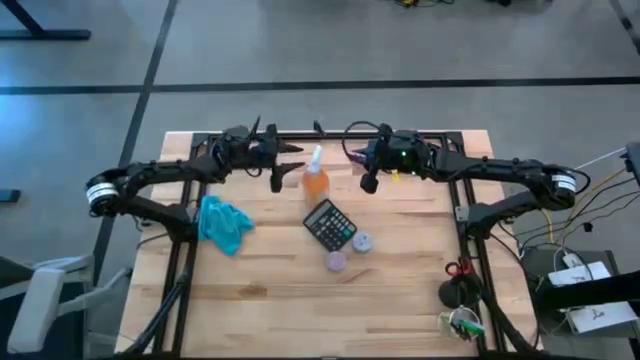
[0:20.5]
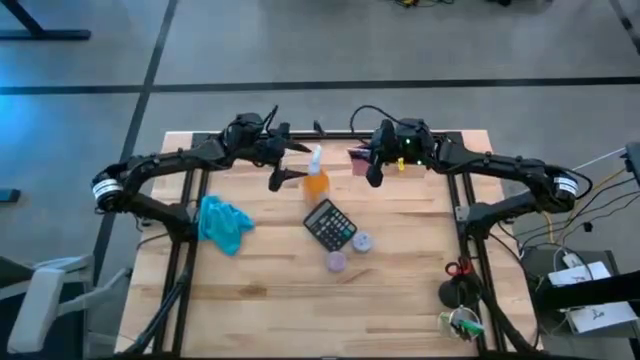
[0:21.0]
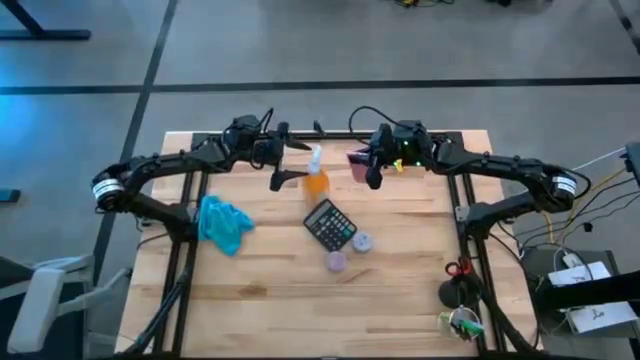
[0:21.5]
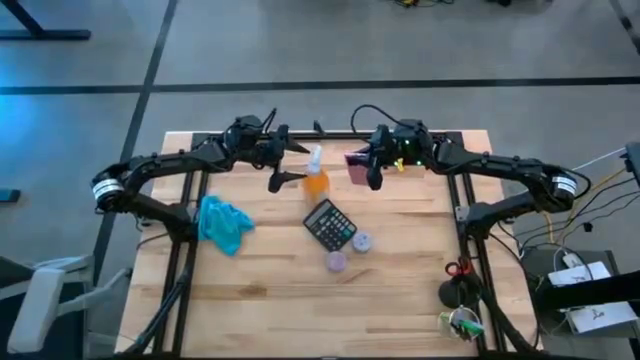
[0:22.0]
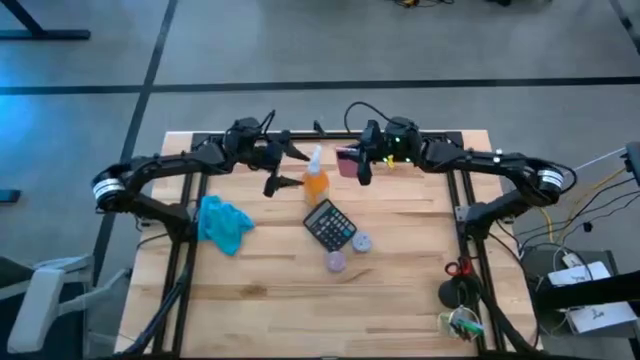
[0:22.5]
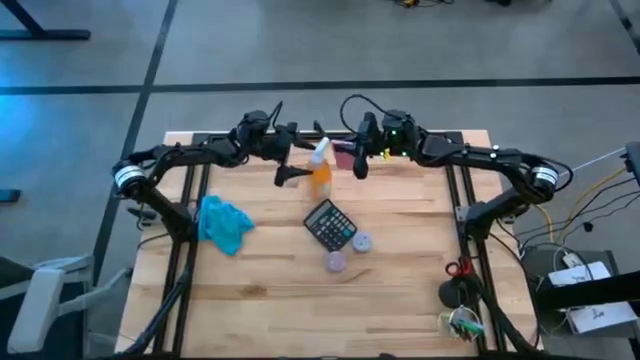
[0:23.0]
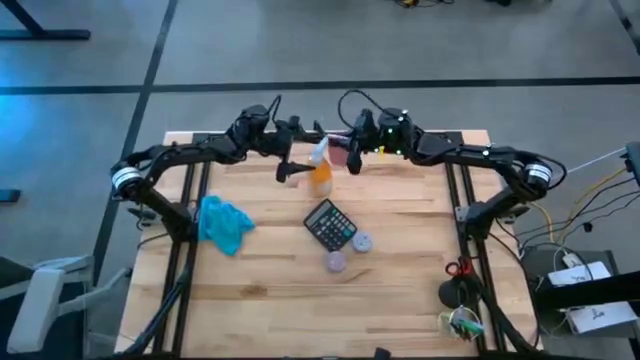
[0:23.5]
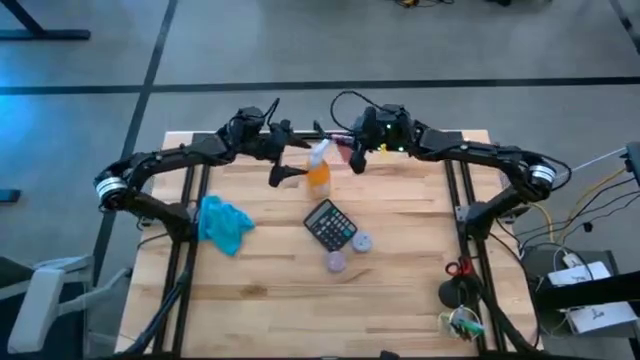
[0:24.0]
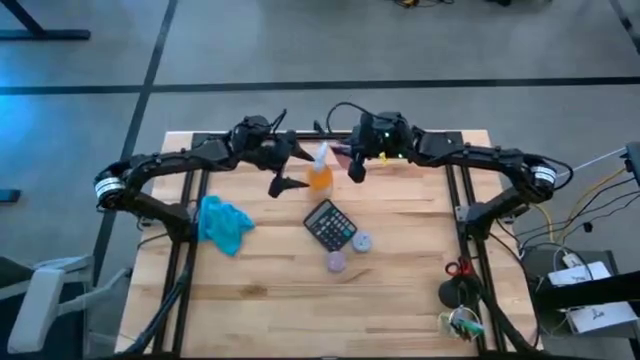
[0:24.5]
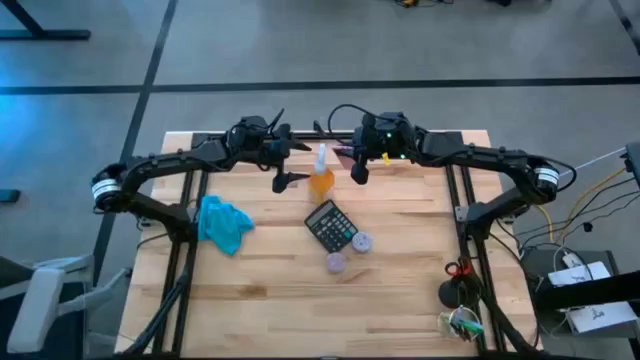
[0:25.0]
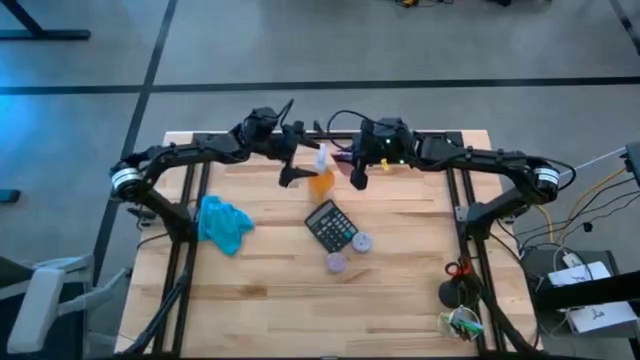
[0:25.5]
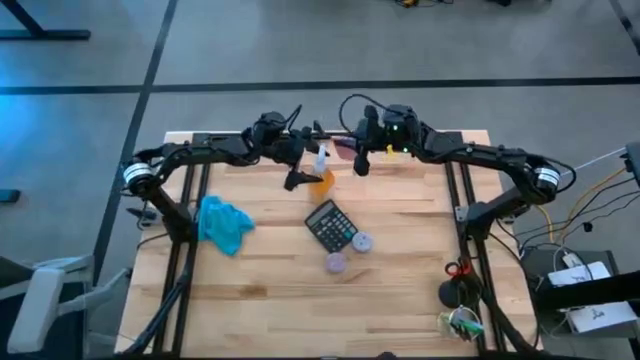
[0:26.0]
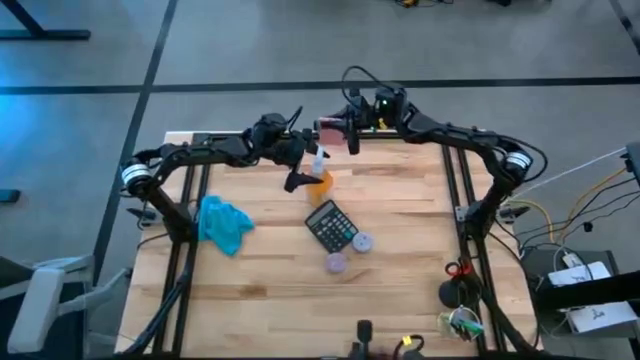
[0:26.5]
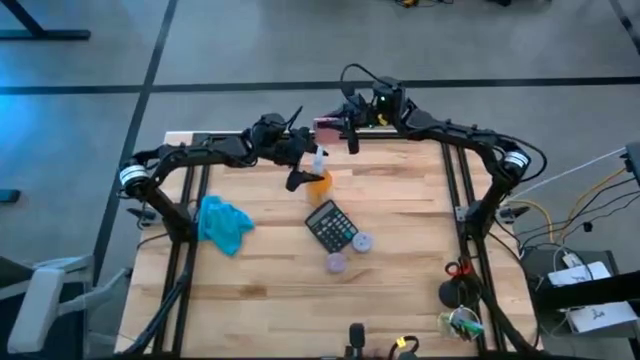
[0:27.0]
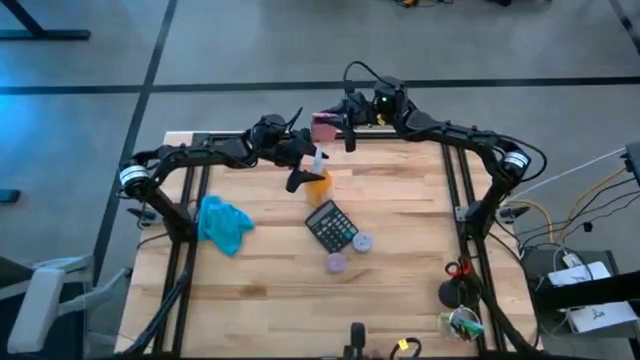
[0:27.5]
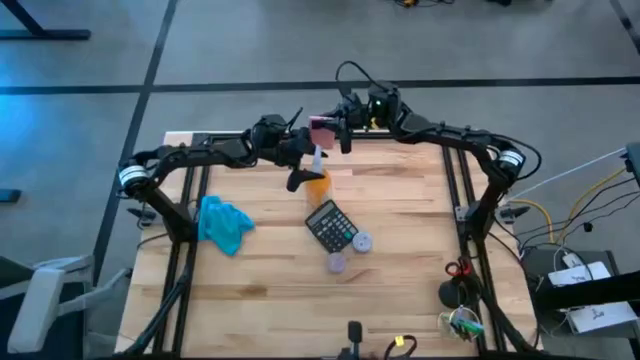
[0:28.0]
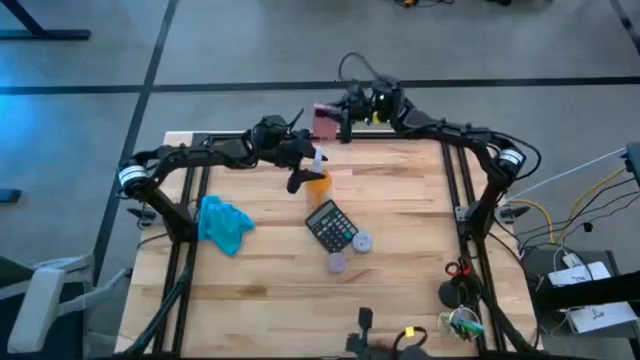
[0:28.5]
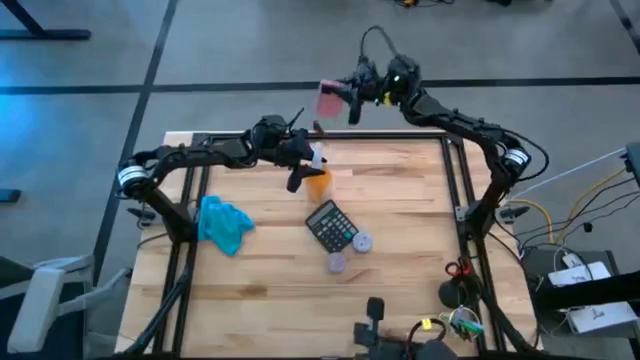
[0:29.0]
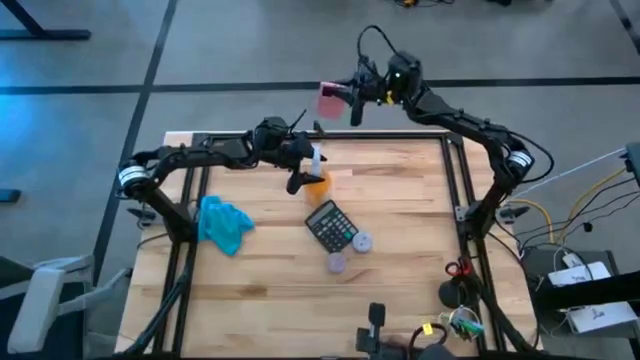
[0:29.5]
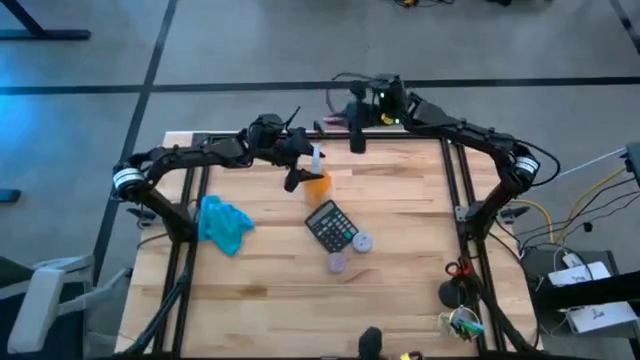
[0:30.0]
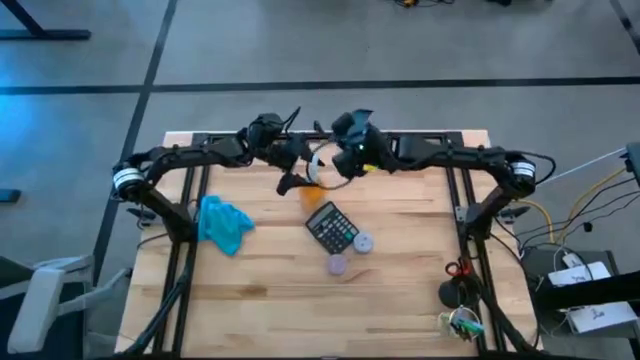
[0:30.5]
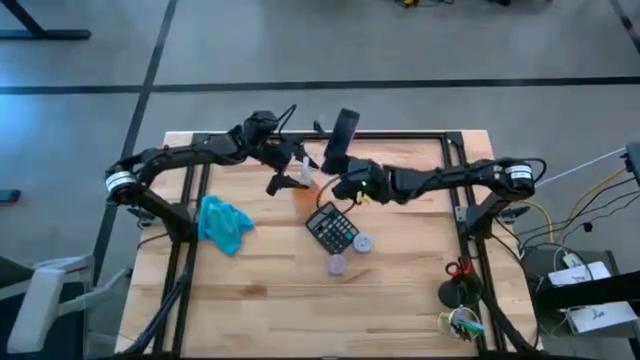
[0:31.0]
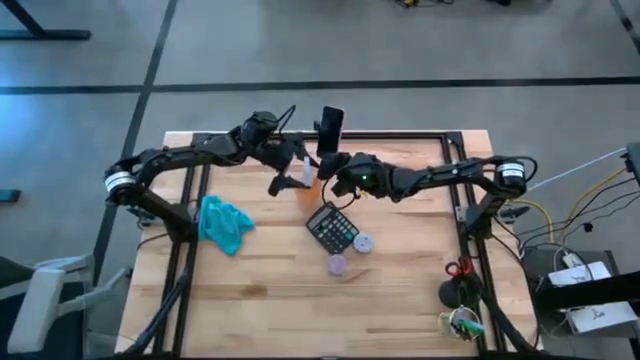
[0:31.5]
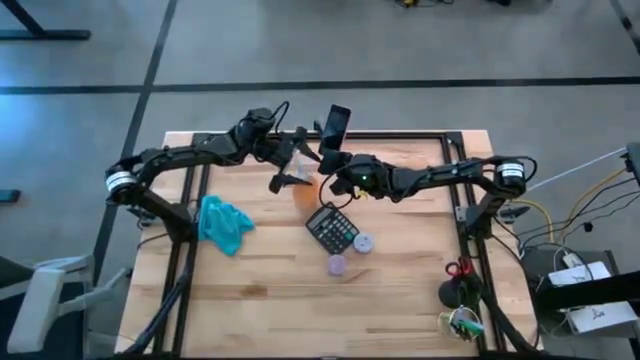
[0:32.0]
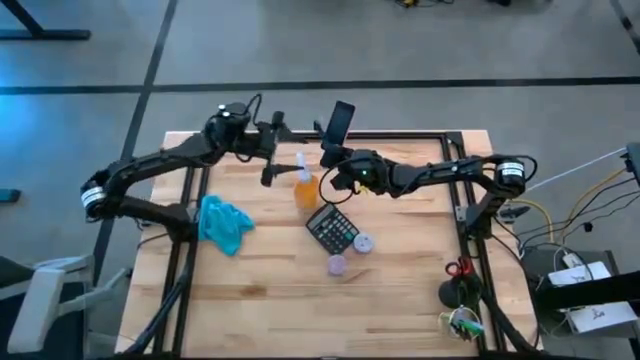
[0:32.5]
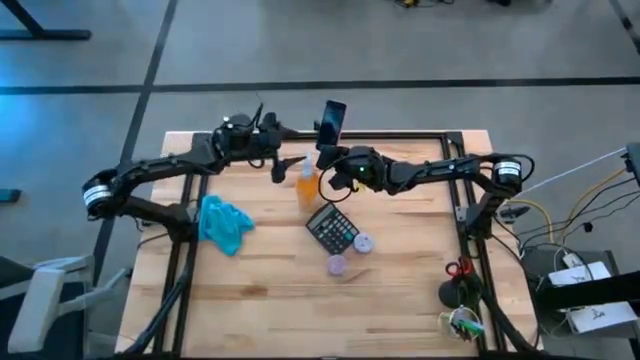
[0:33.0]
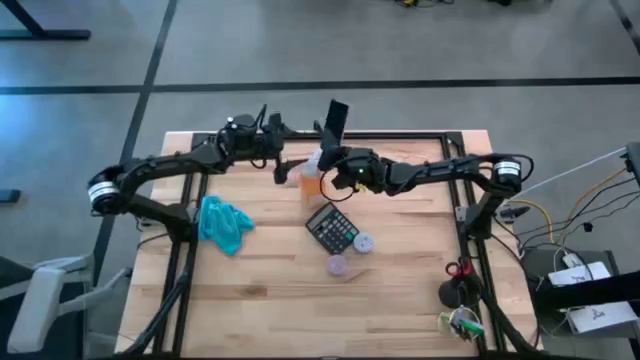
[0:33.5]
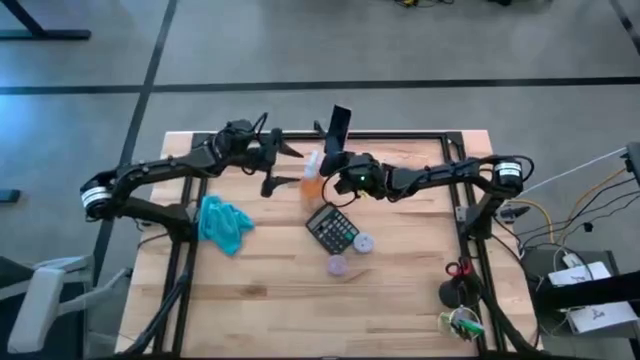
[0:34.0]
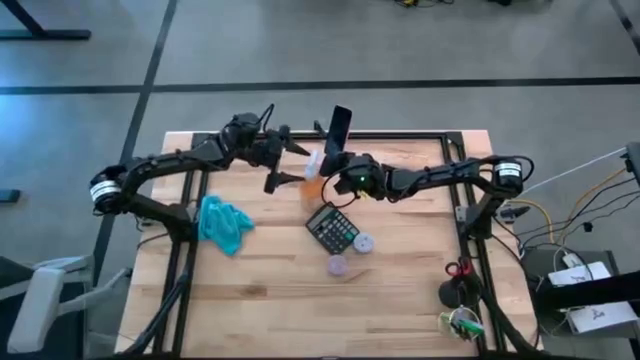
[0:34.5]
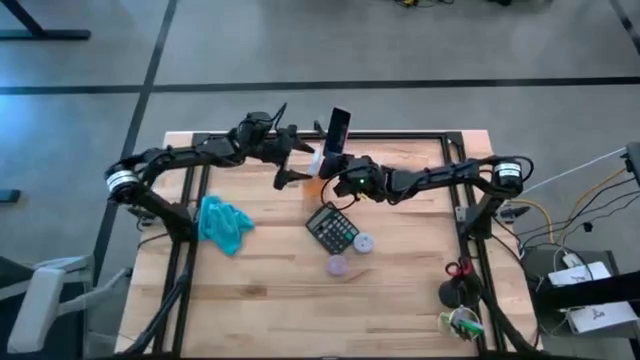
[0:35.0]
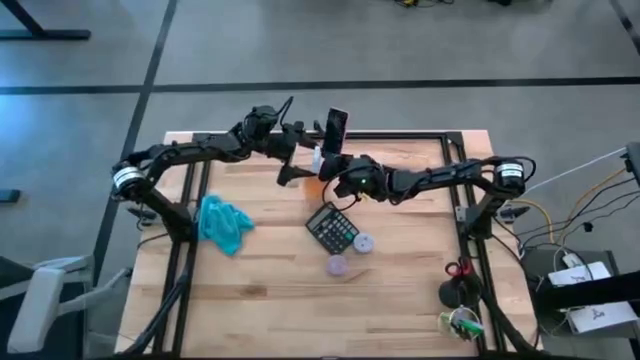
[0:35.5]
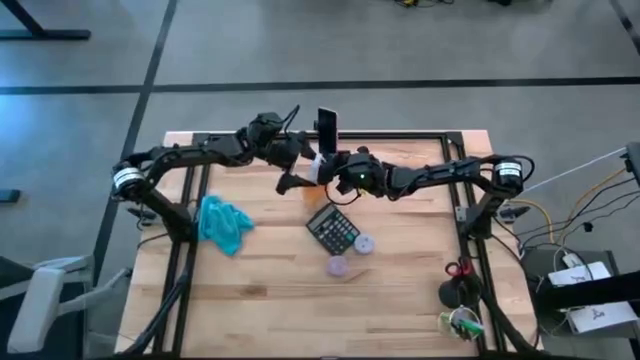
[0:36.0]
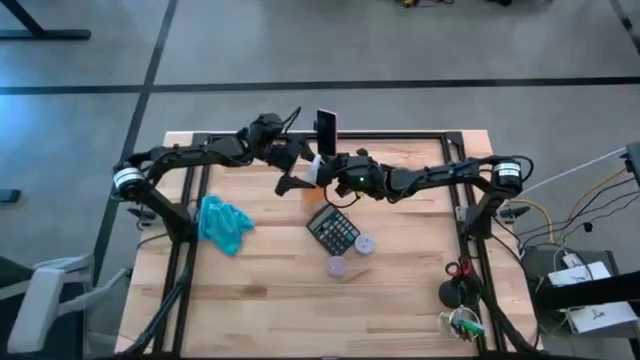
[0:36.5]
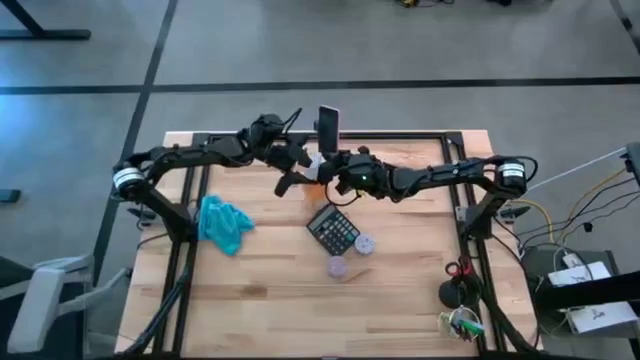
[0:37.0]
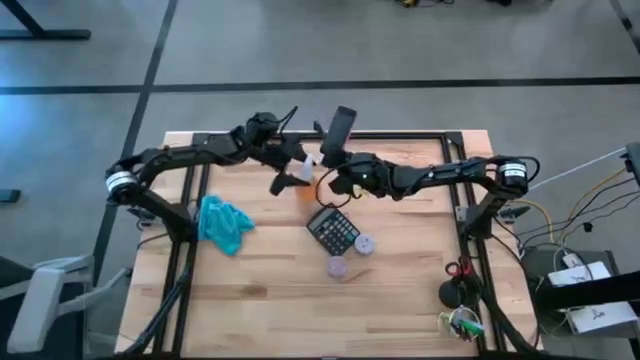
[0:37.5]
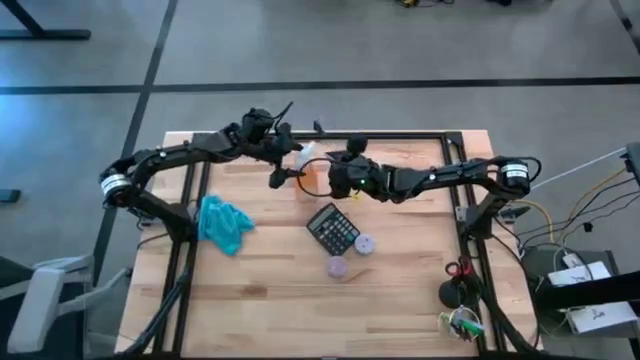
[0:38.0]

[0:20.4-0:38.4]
Task: Apply microfiber cloth
Spray the back and front of the pink cellphone using the orange spray bottle

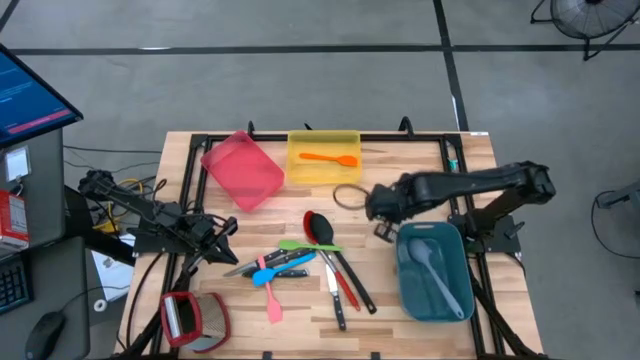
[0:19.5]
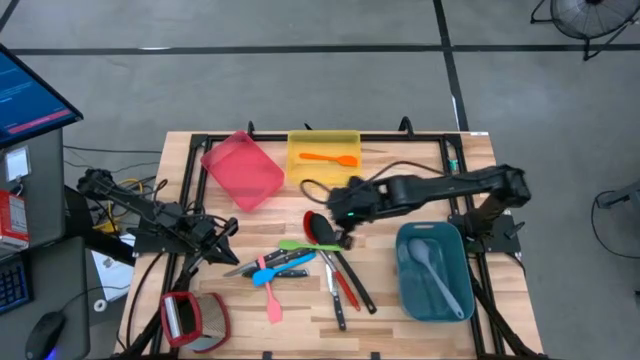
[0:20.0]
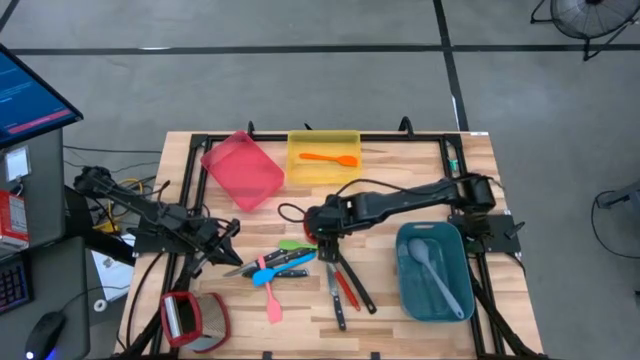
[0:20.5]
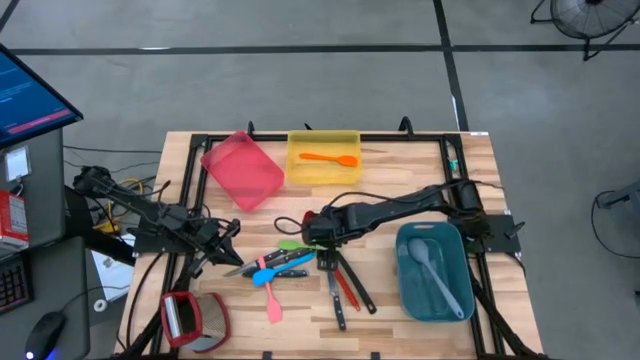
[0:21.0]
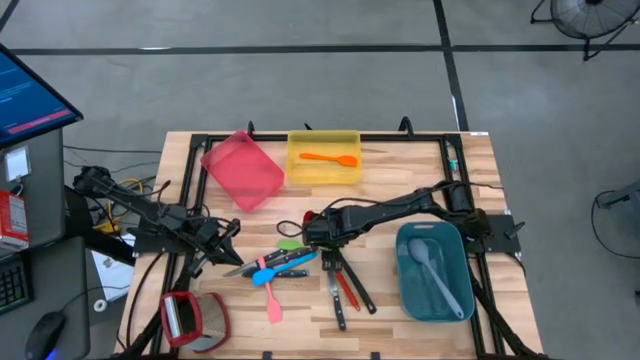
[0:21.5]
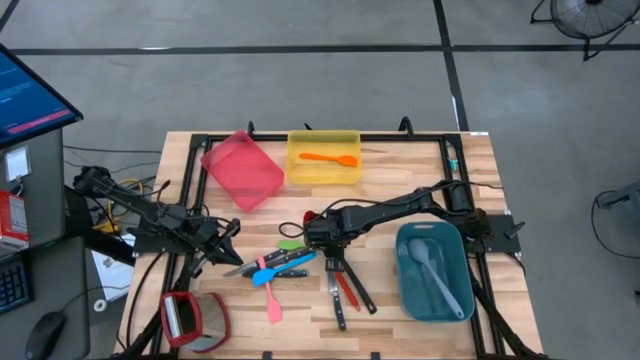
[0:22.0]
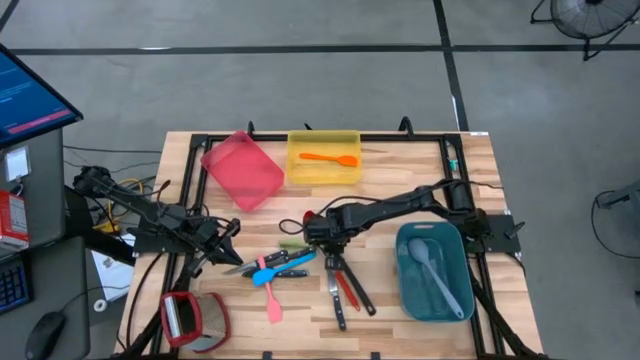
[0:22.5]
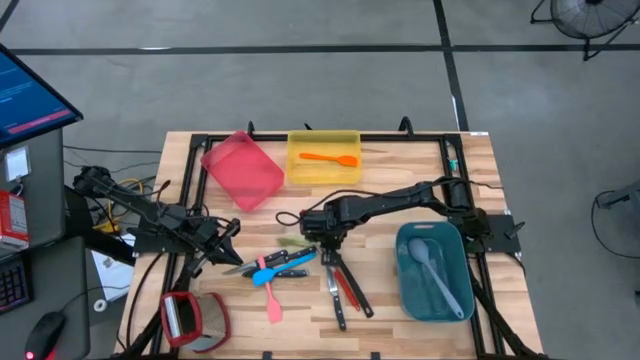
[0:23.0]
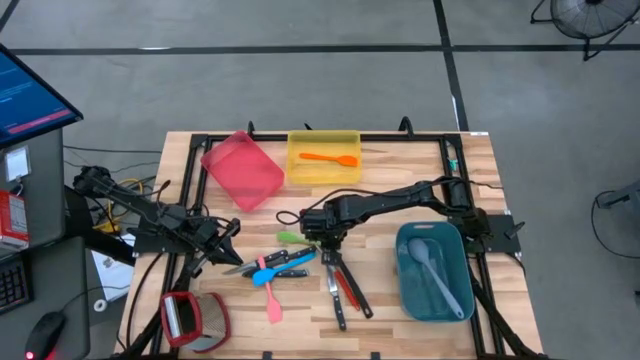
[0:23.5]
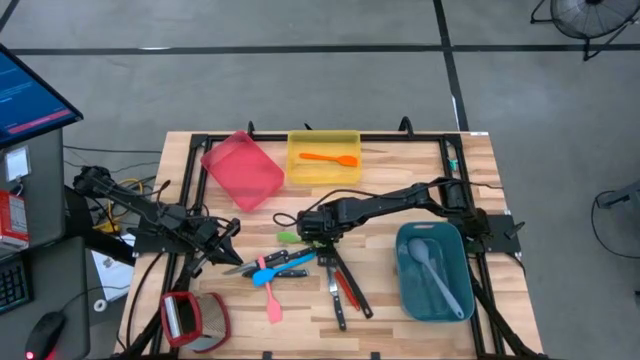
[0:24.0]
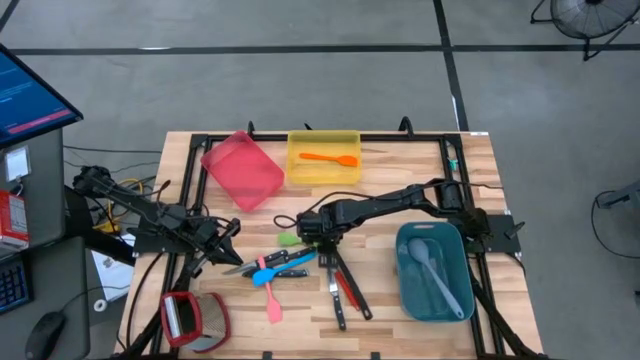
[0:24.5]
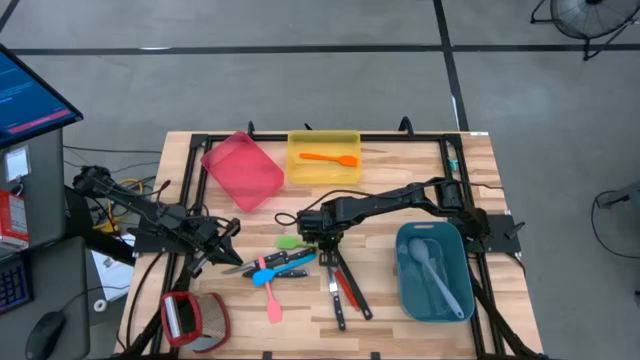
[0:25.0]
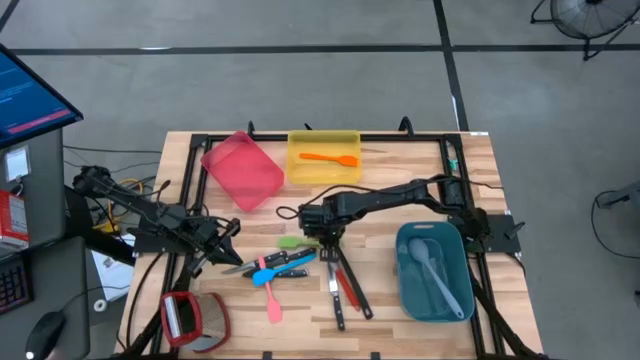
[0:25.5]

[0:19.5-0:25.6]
Task: Pick & Place Kitchen Items
Put the light green spatula into the yellow bin
